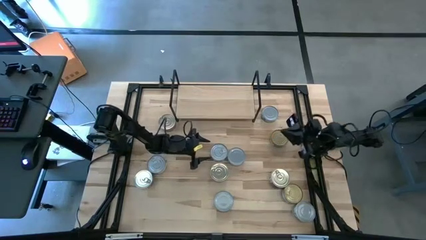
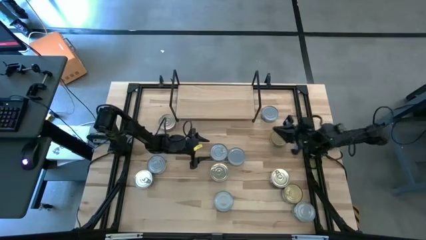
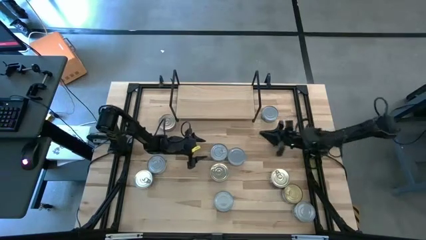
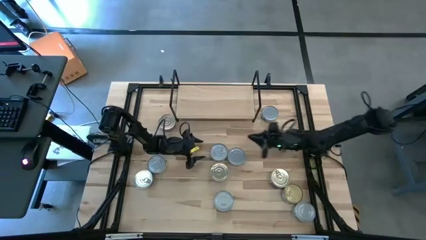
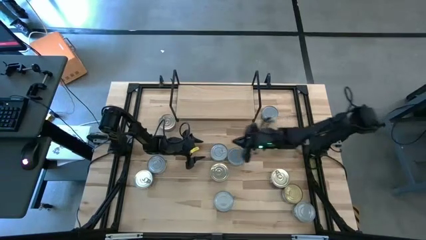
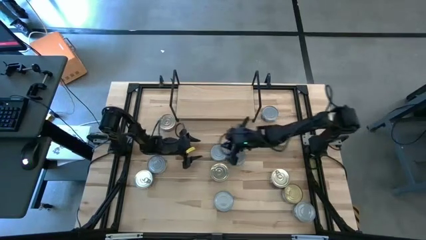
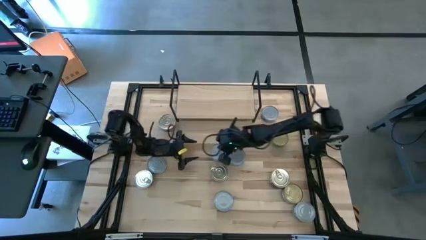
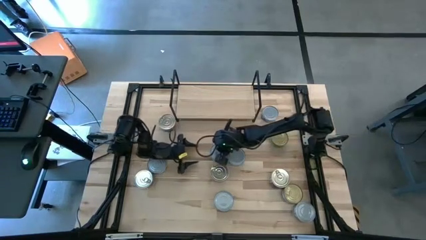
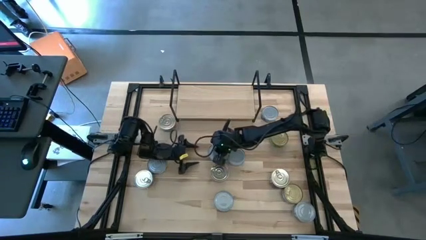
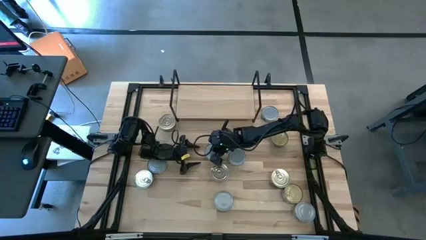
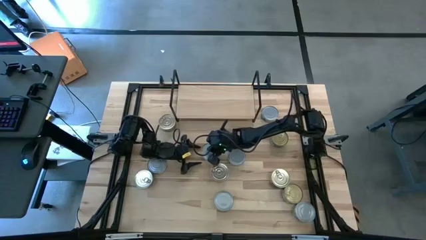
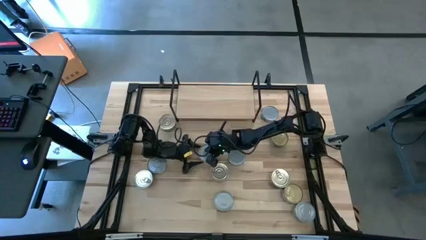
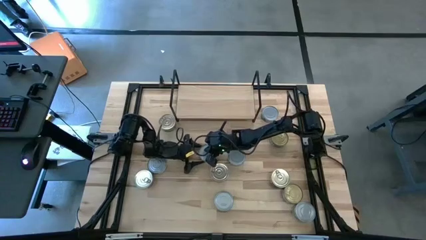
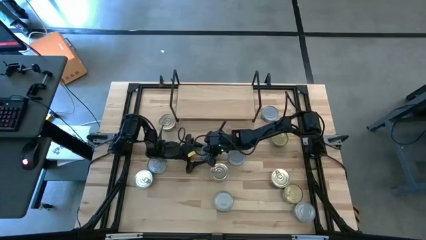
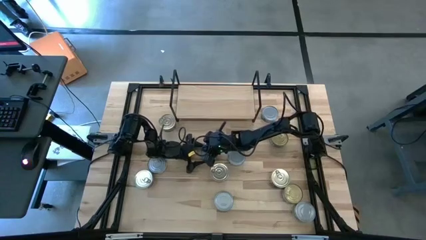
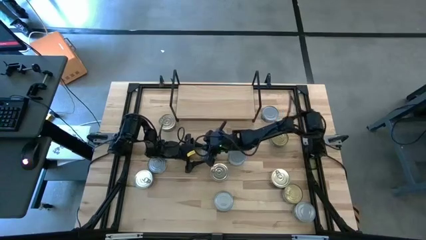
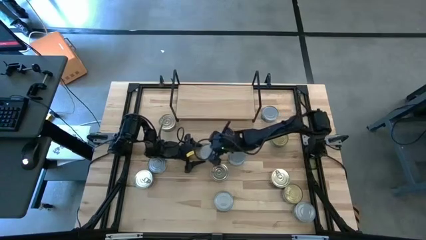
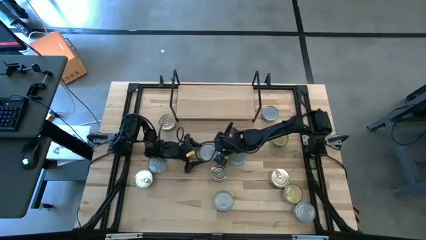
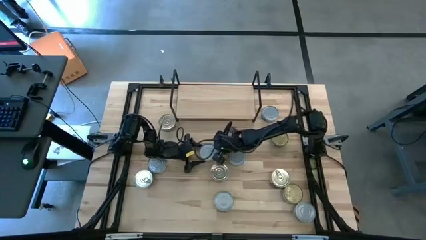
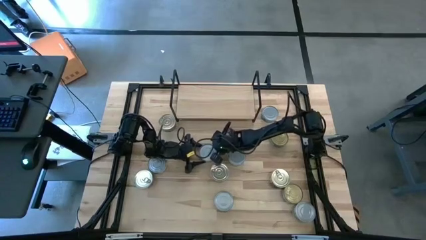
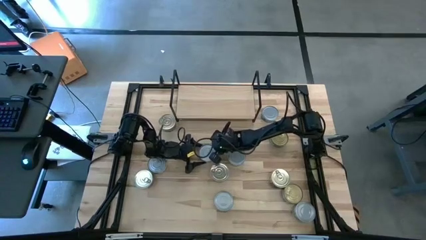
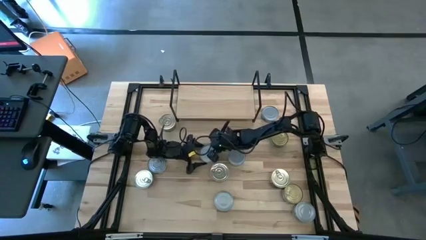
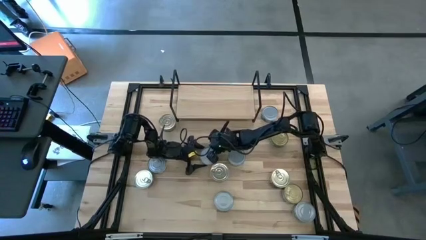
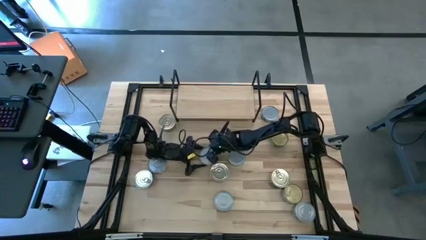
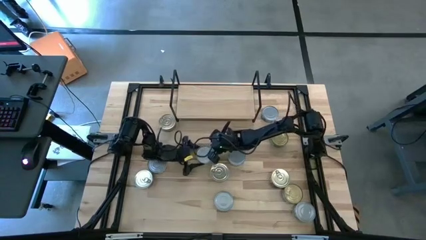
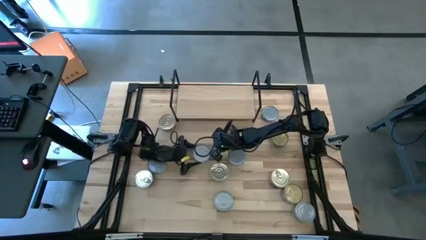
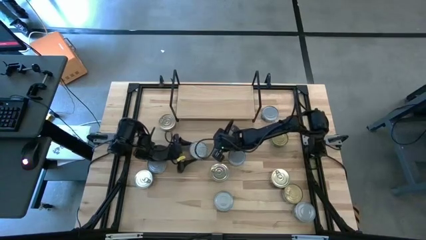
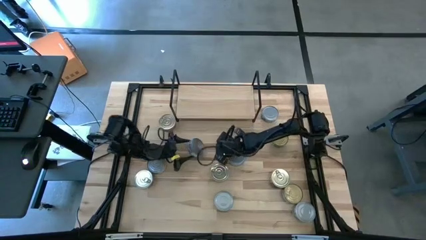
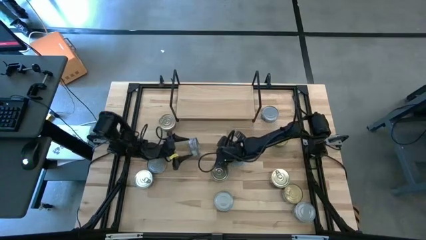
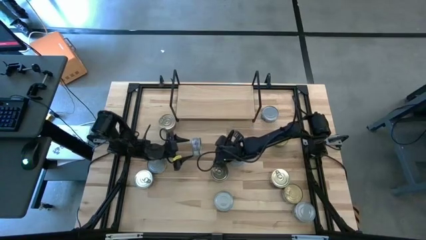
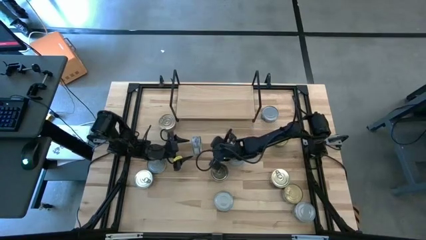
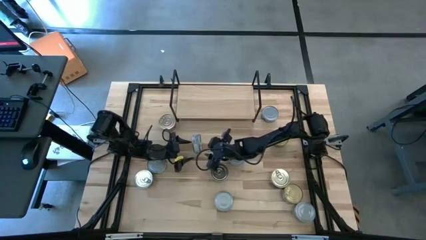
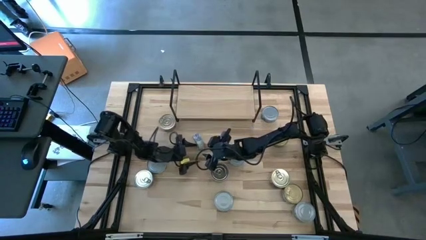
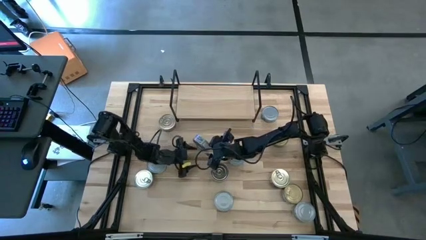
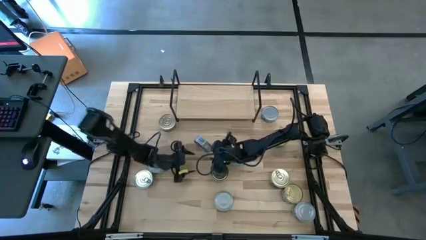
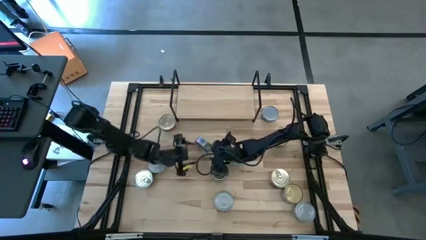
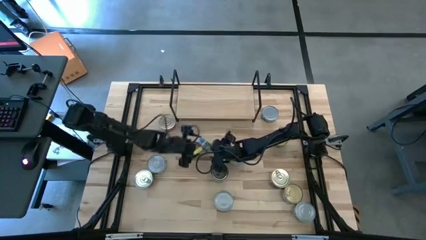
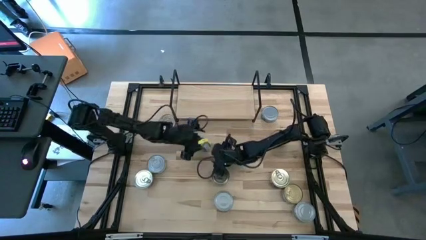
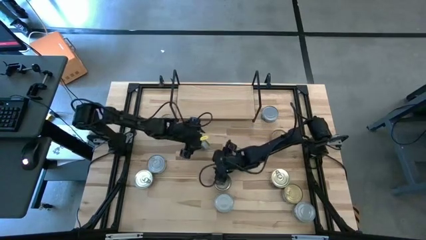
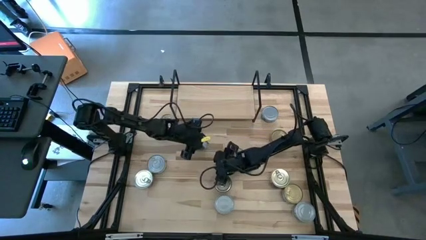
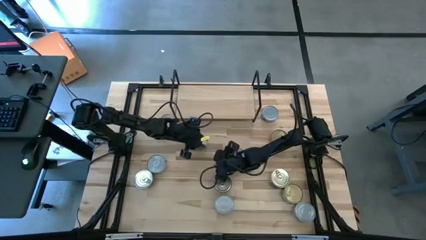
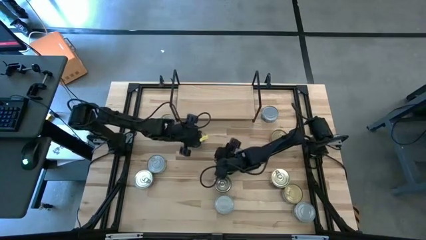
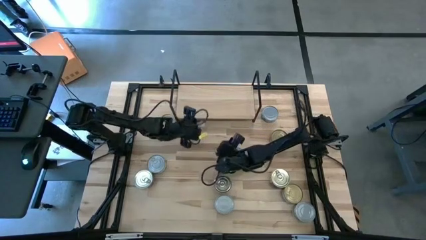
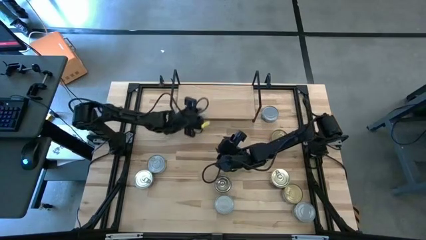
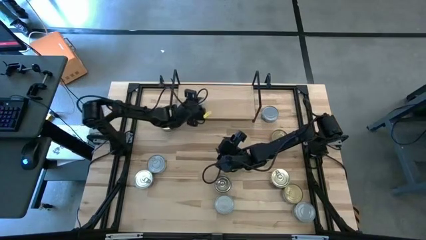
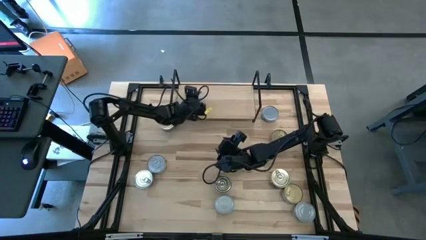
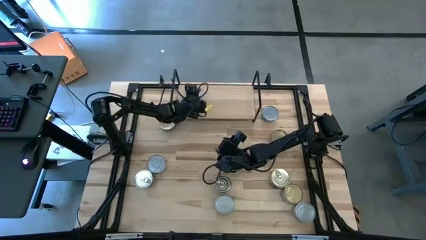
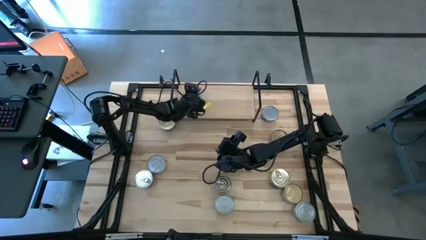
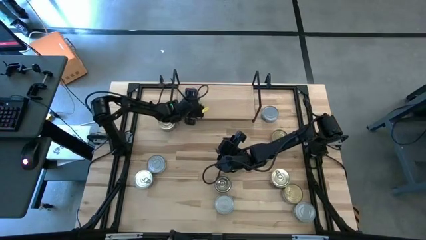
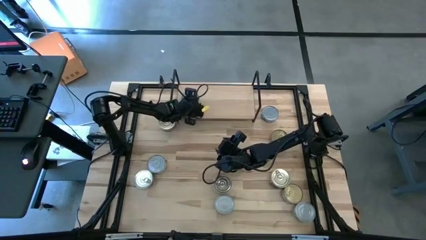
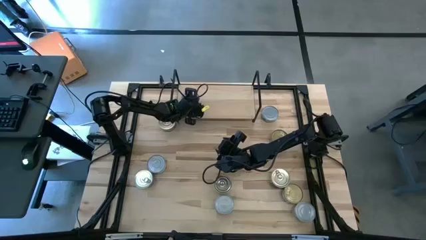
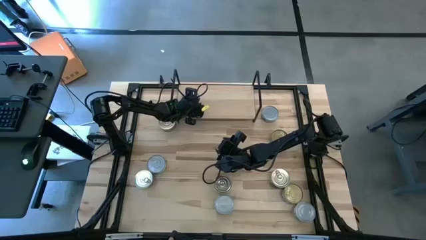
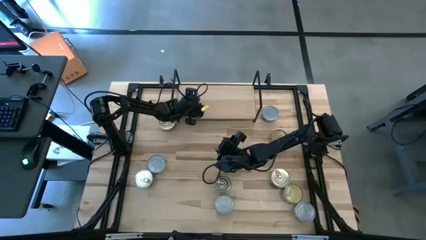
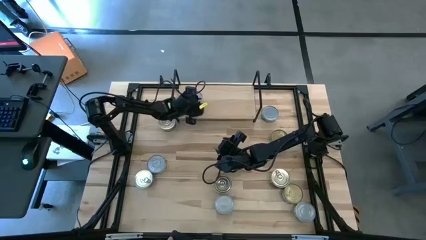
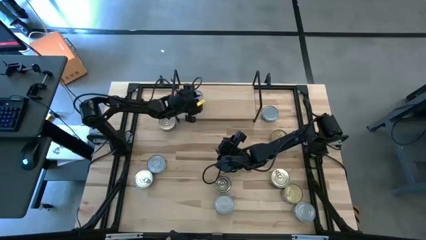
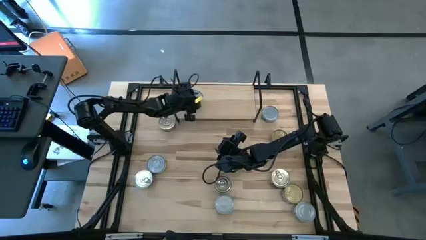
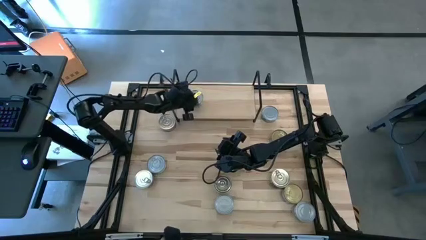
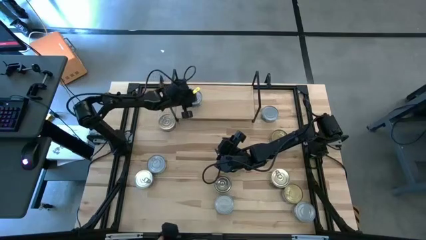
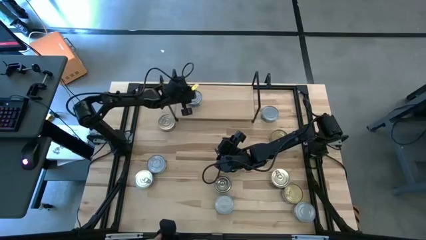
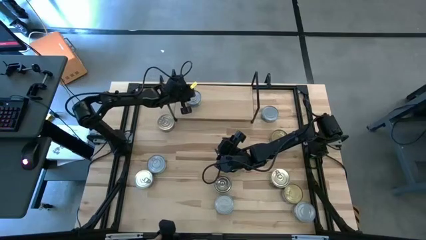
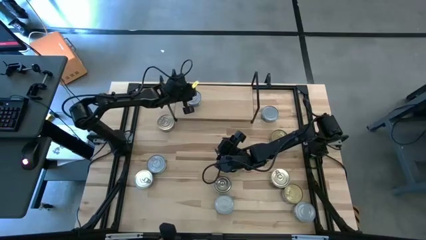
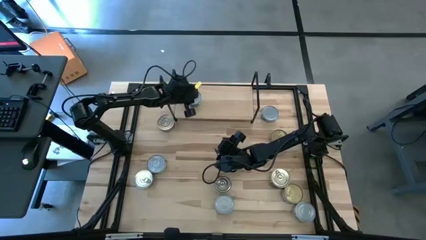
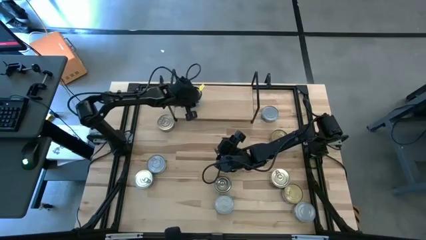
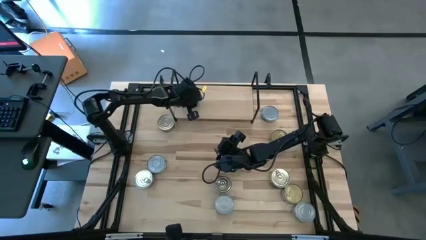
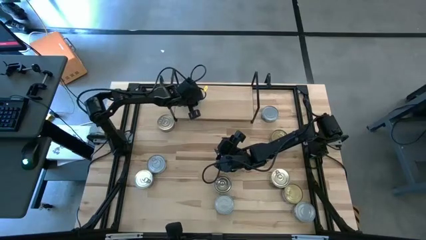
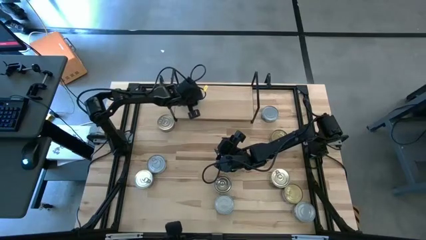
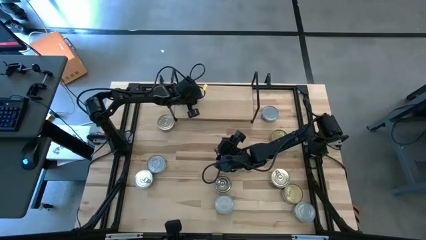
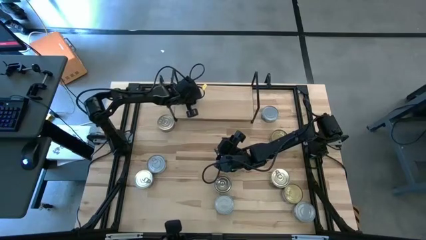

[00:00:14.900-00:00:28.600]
Task: Stack canned seafood by type on shelf
Put the top right green and blue tuna can on the shelf
